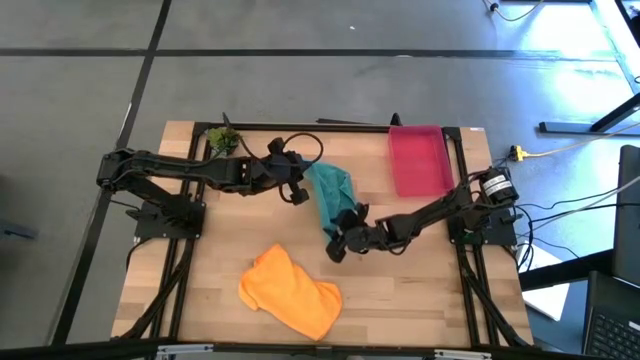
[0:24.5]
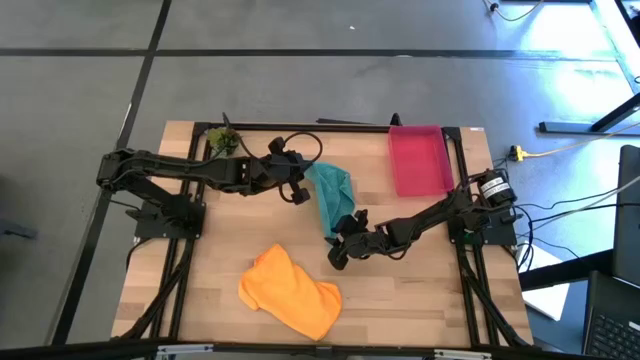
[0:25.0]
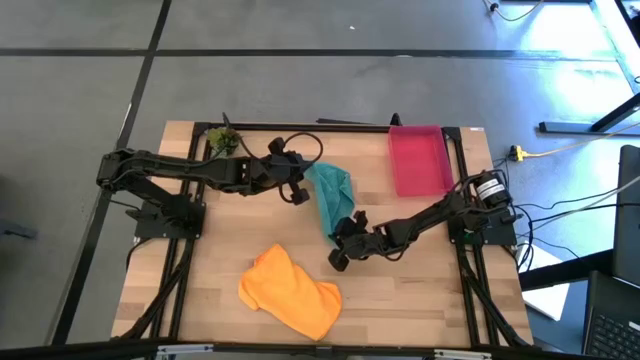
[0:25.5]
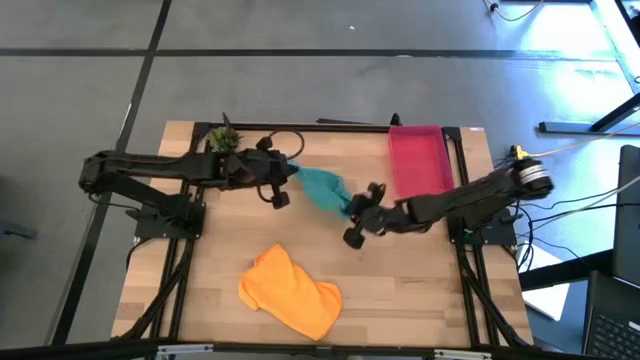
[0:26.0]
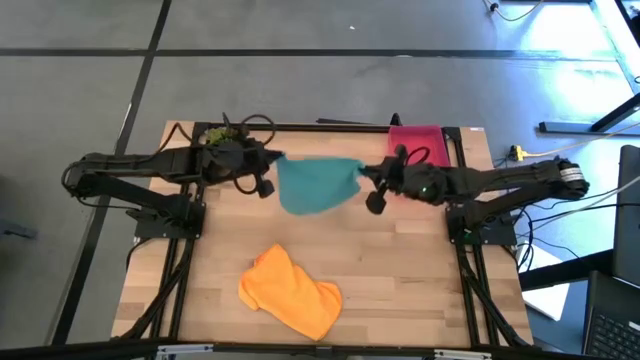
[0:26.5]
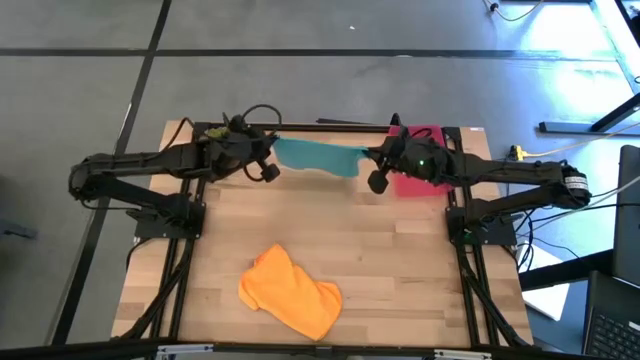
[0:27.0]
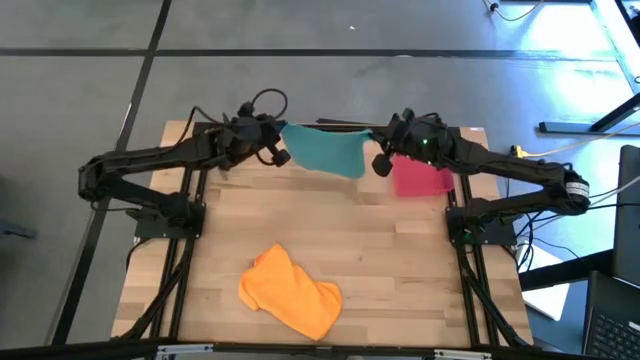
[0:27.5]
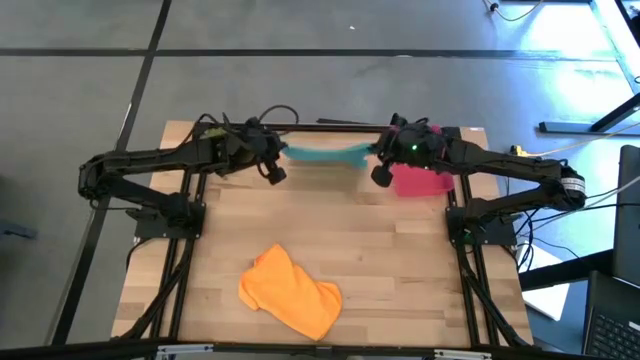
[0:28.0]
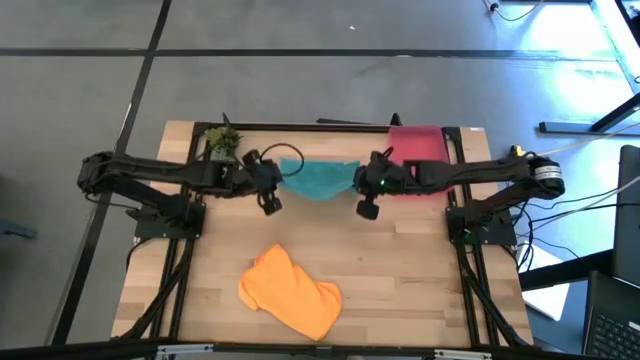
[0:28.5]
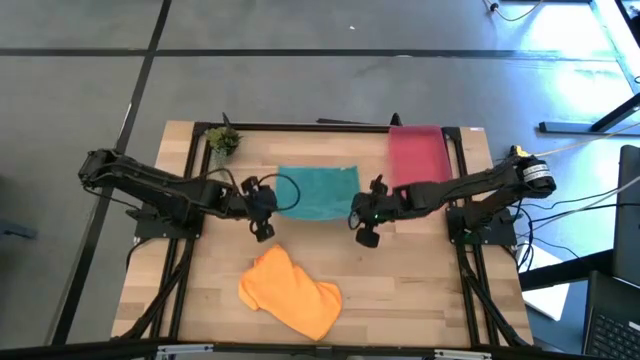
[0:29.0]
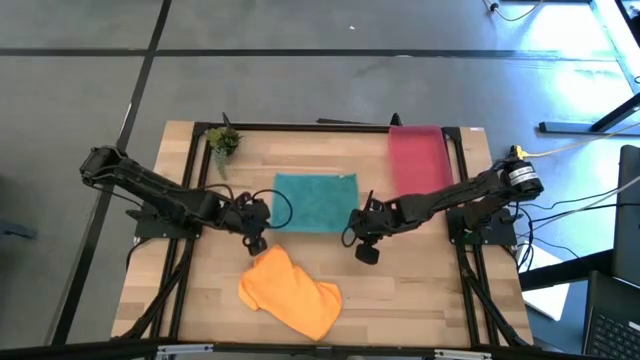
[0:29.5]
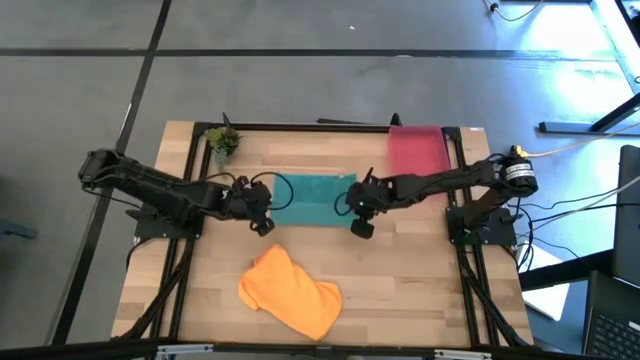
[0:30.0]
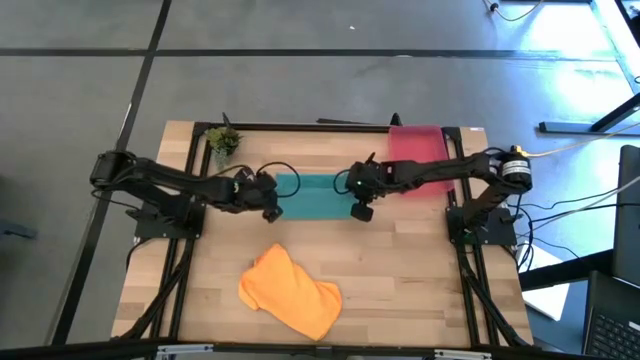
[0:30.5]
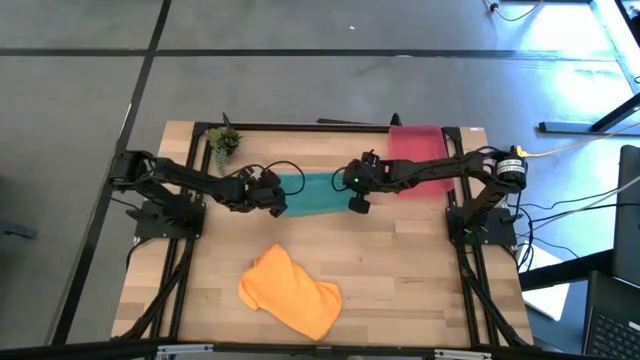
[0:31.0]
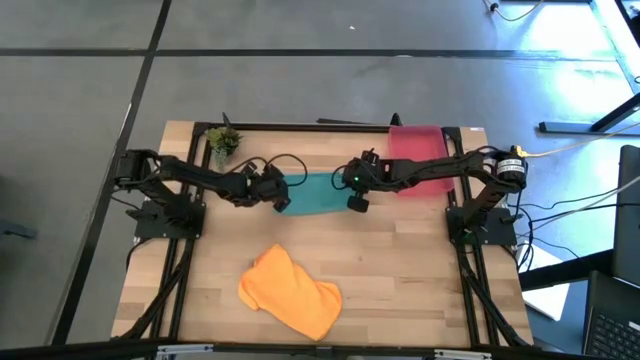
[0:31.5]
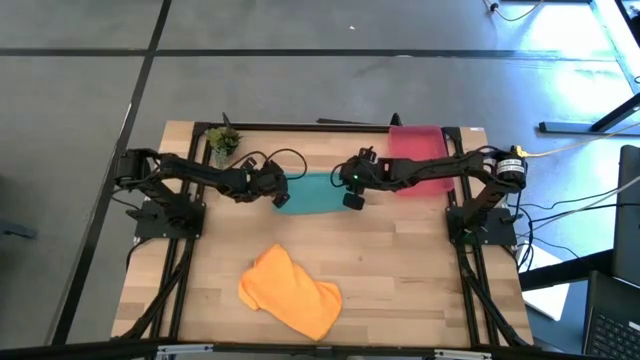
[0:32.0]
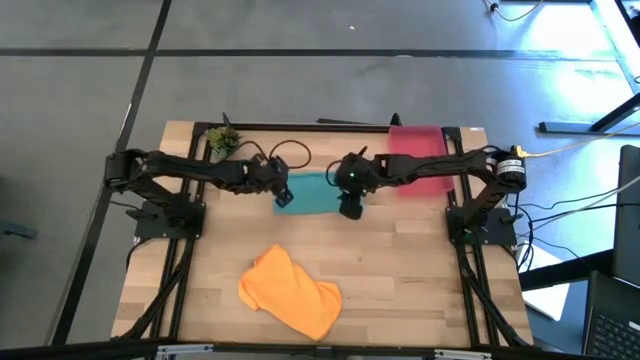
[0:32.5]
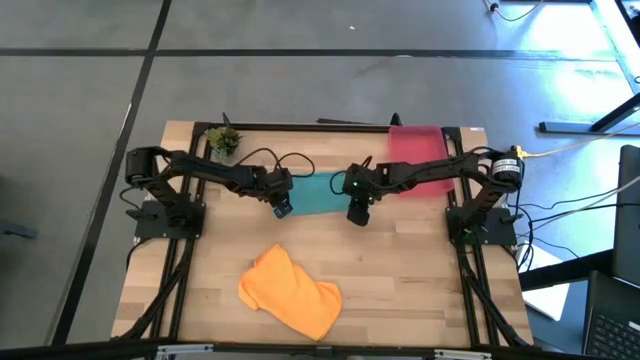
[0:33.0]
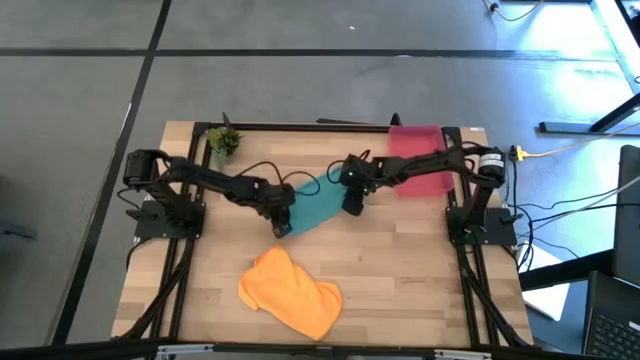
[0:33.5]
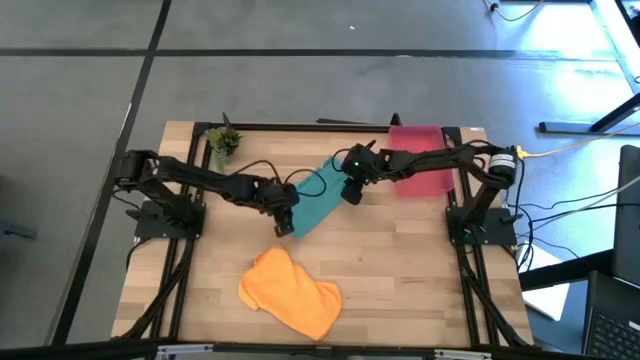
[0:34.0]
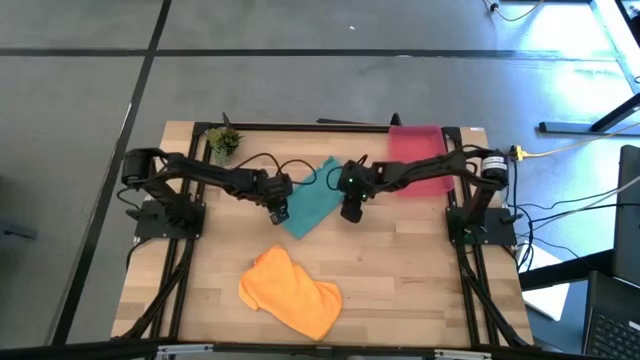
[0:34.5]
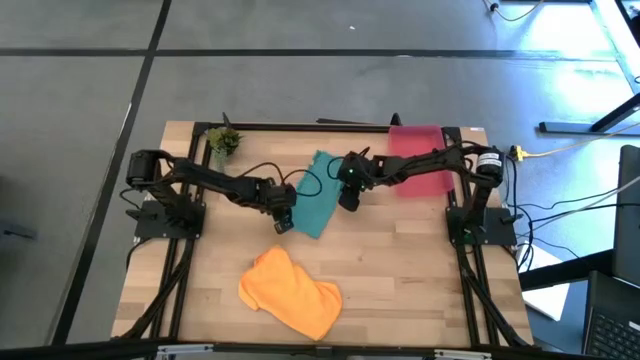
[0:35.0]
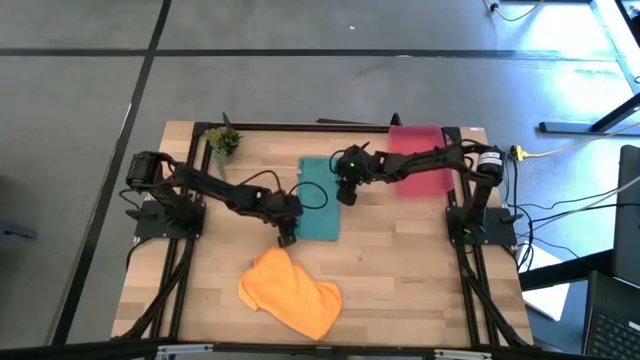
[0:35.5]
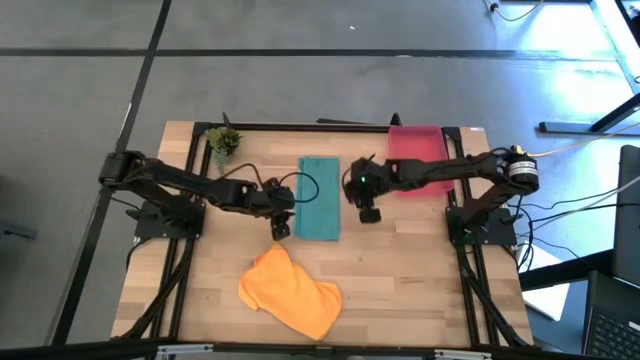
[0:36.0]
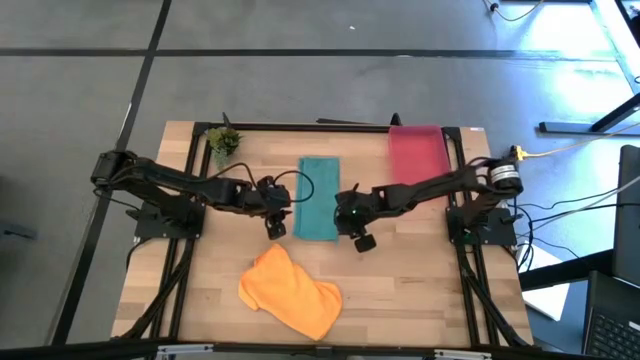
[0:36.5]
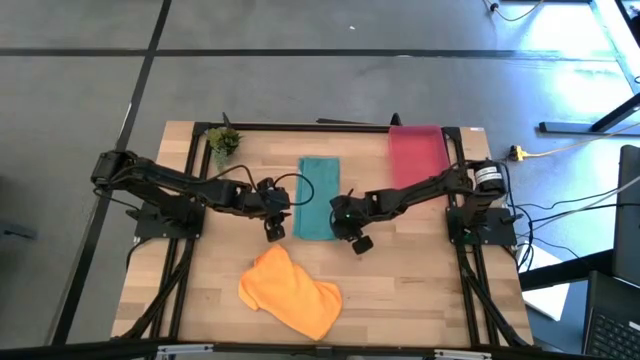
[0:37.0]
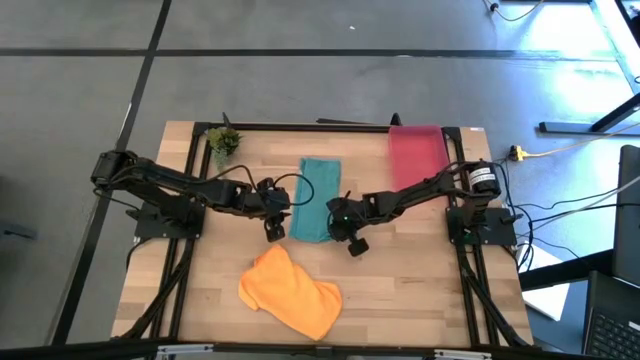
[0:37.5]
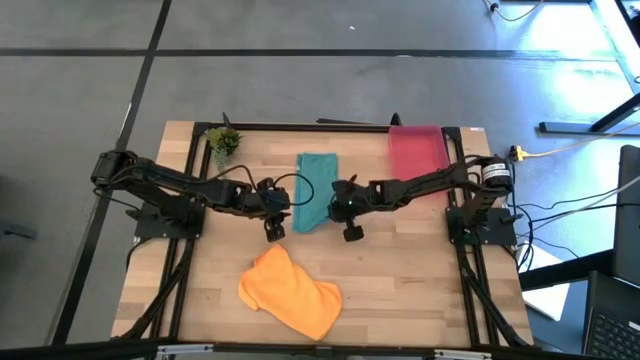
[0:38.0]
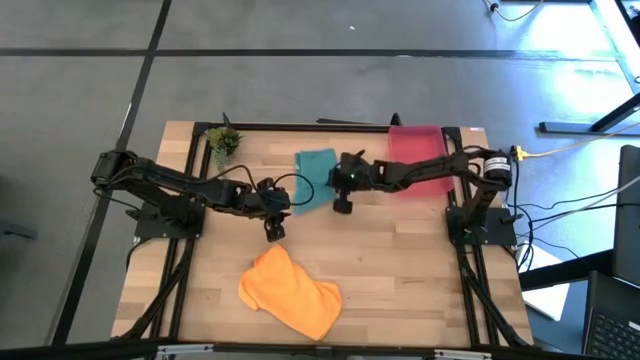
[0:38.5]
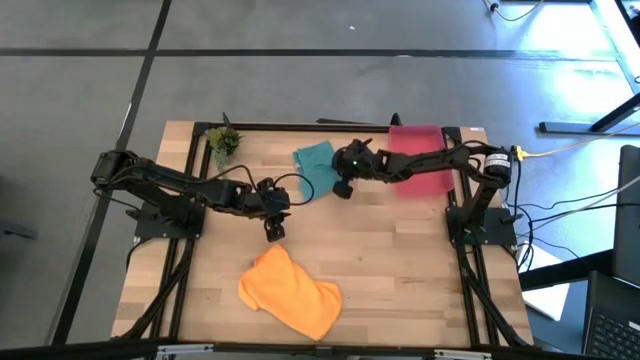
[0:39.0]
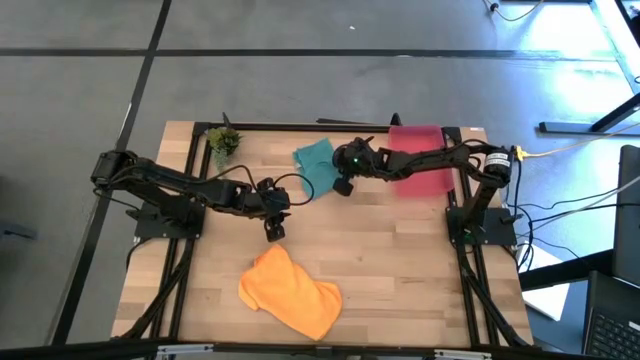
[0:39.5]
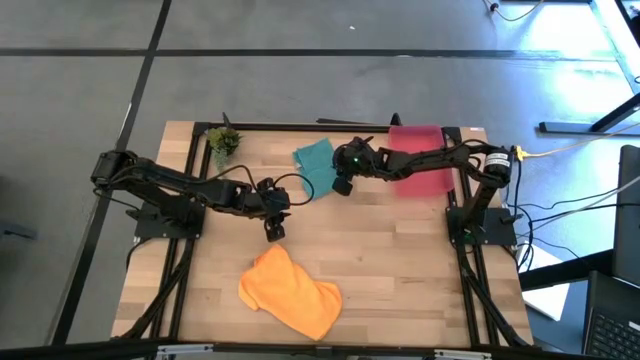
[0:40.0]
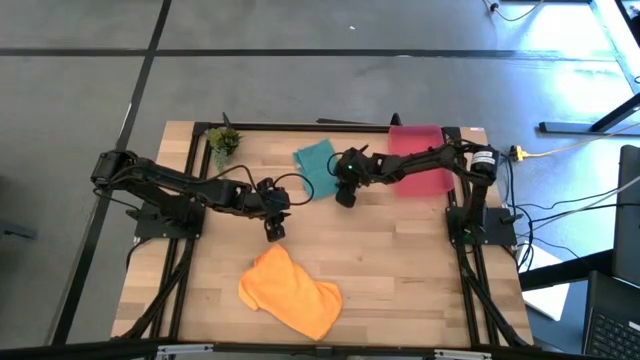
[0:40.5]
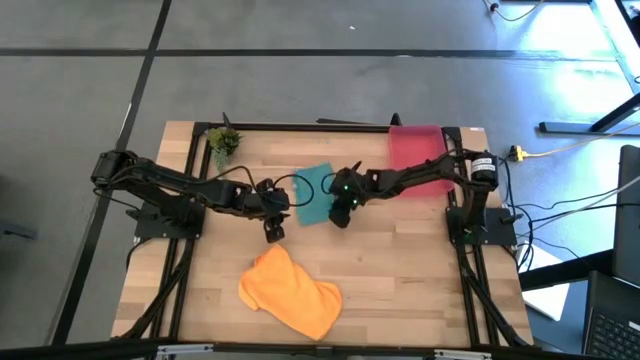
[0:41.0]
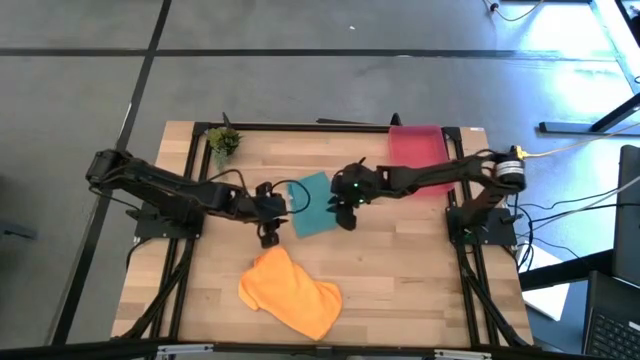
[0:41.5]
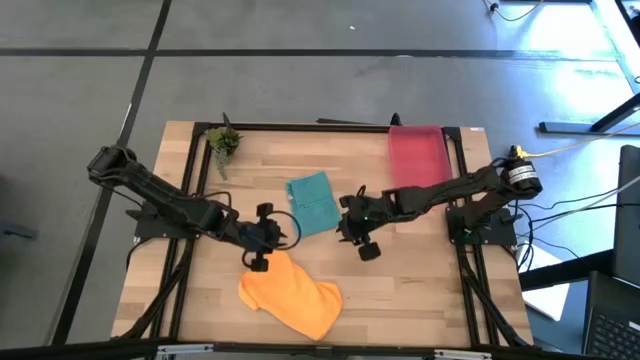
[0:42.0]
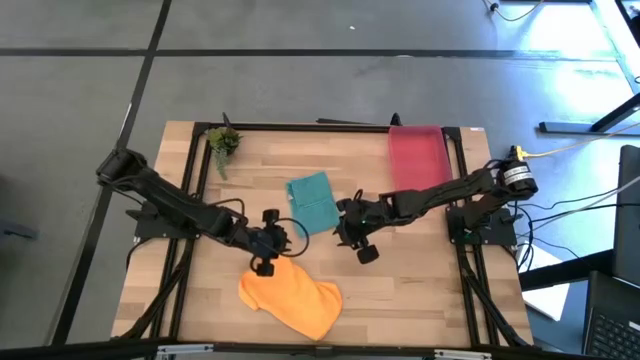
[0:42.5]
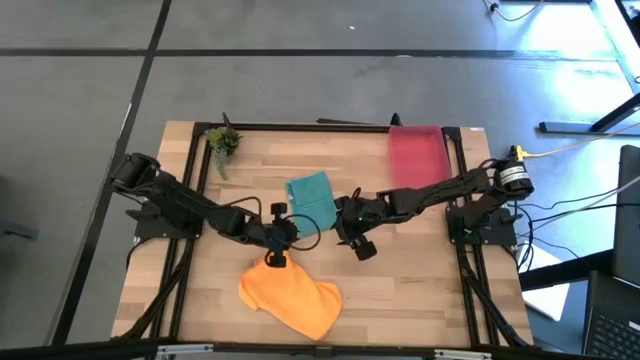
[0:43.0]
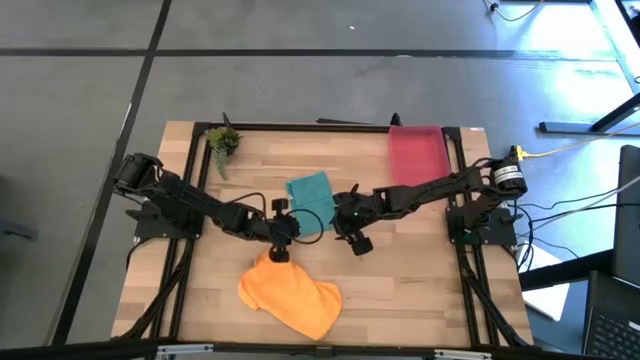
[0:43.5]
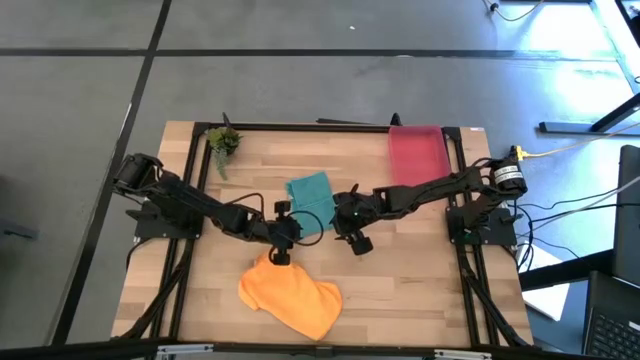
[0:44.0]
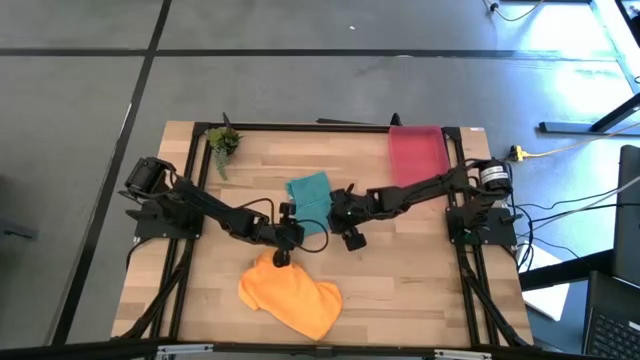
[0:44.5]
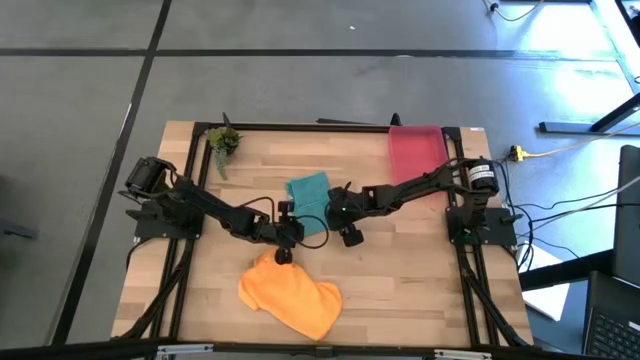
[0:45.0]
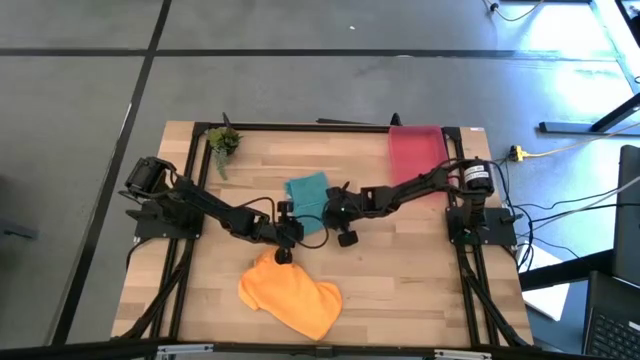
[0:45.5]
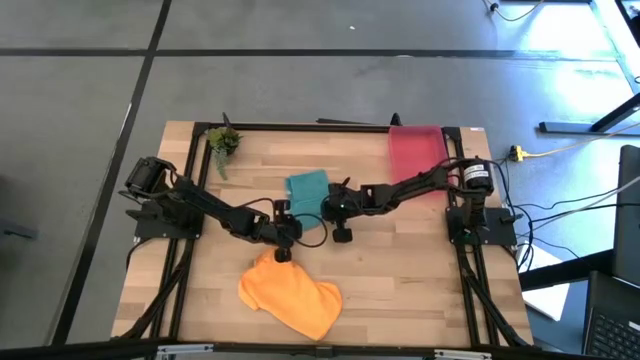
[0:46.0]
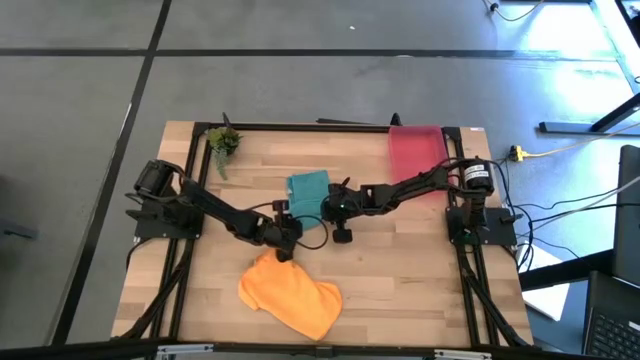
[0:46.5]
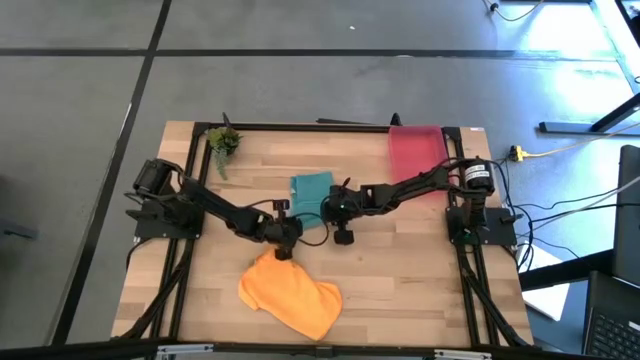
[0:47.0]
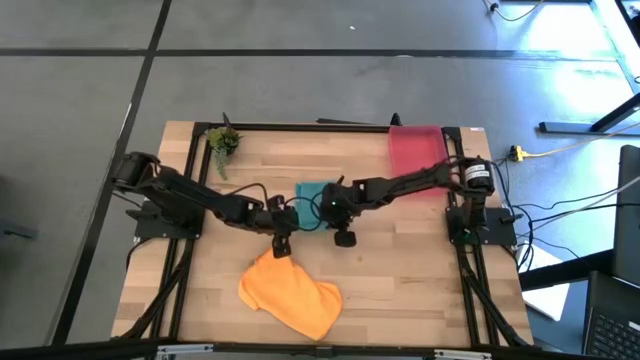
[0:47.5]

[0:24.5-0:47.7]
Task: Roll microfiber towels into tight, uniform cylinder then place into a basket
Roll the blue microfiber cloth on the table
